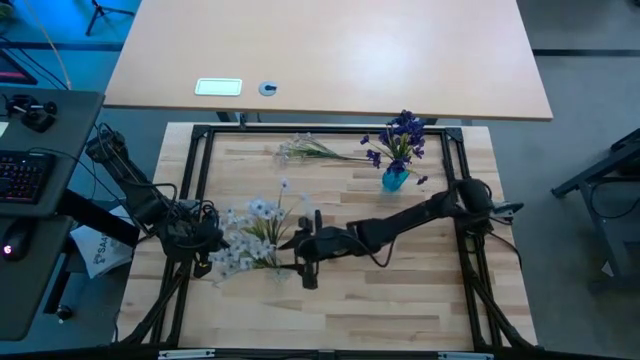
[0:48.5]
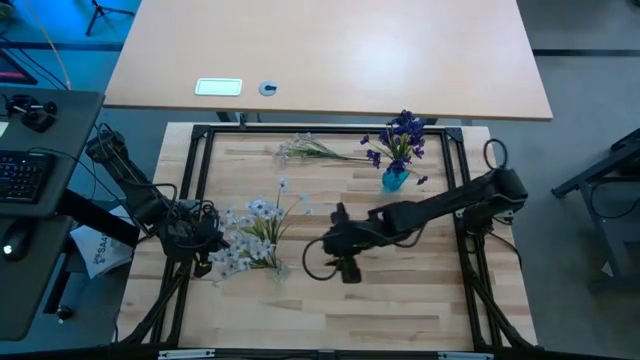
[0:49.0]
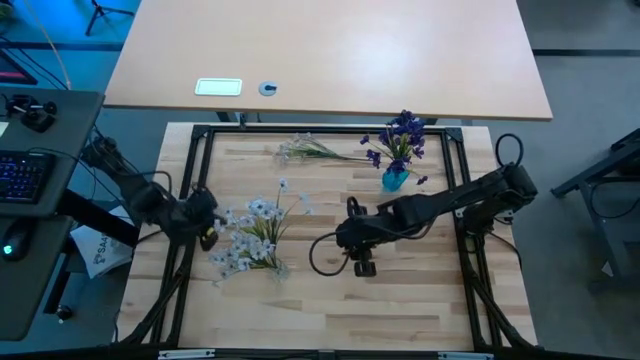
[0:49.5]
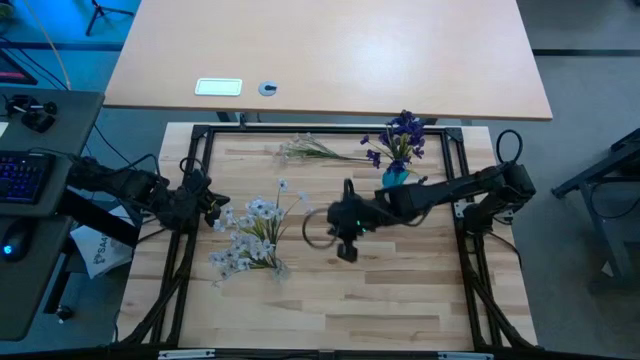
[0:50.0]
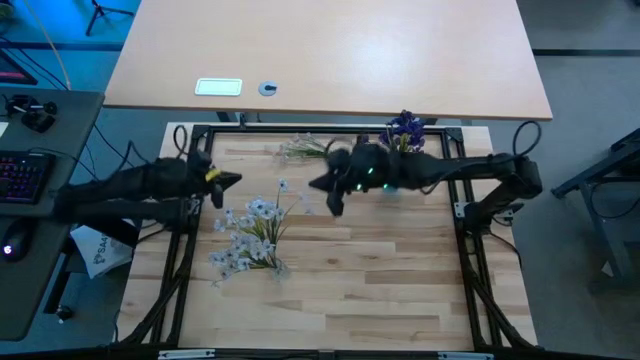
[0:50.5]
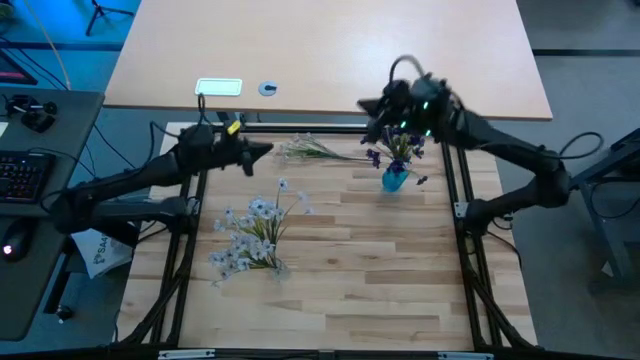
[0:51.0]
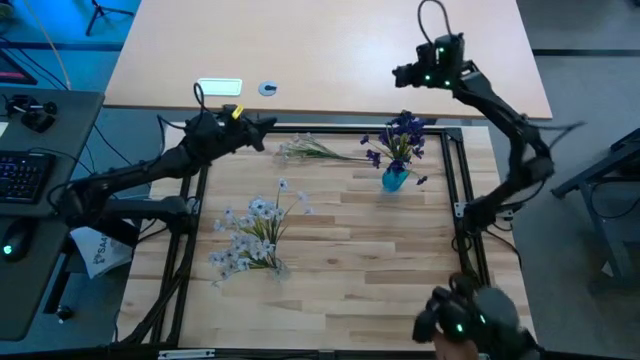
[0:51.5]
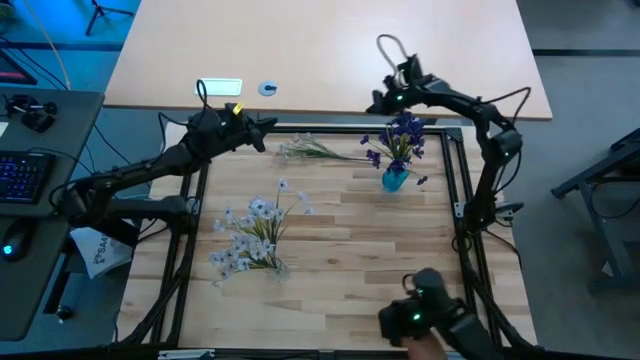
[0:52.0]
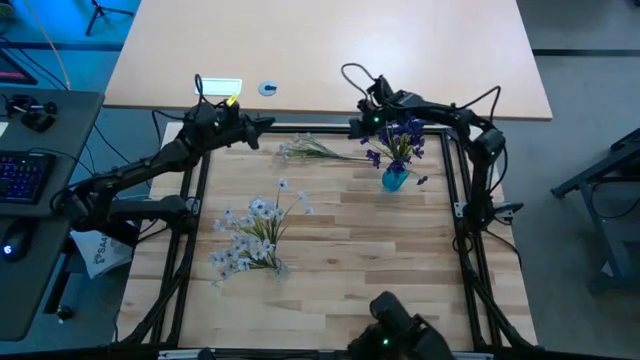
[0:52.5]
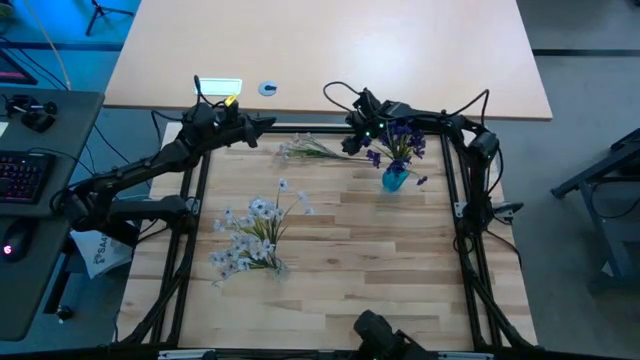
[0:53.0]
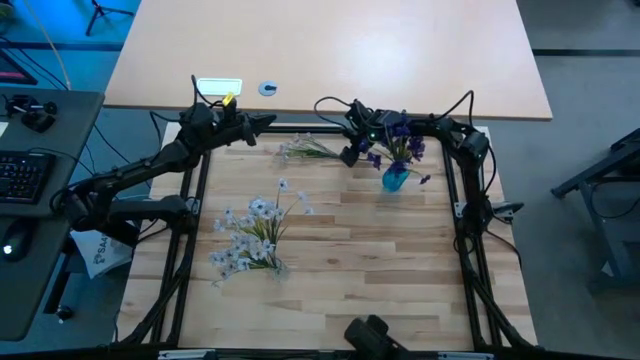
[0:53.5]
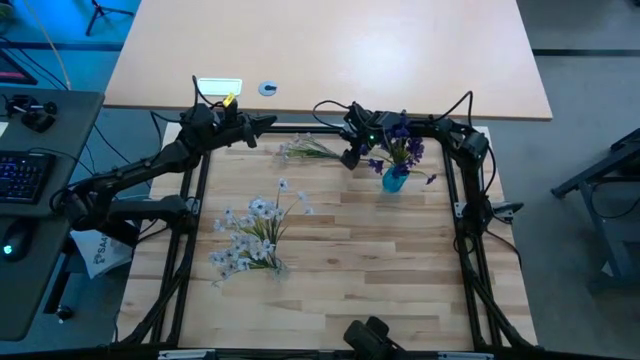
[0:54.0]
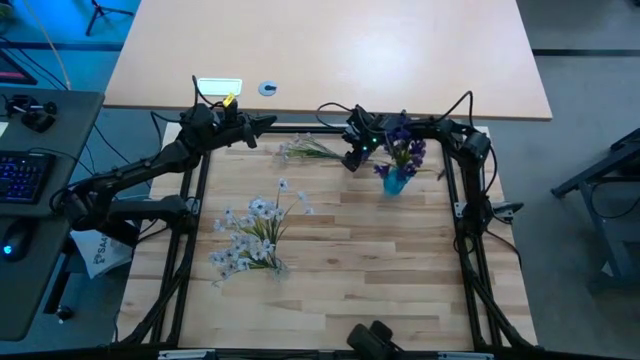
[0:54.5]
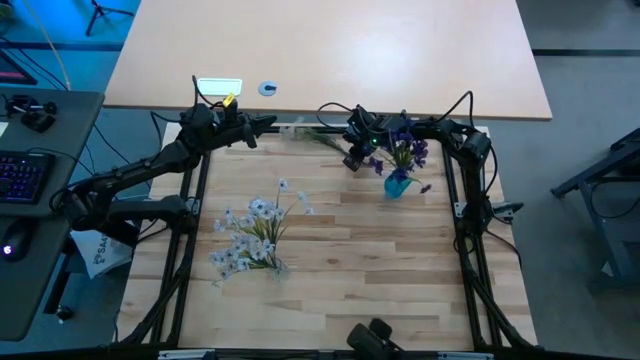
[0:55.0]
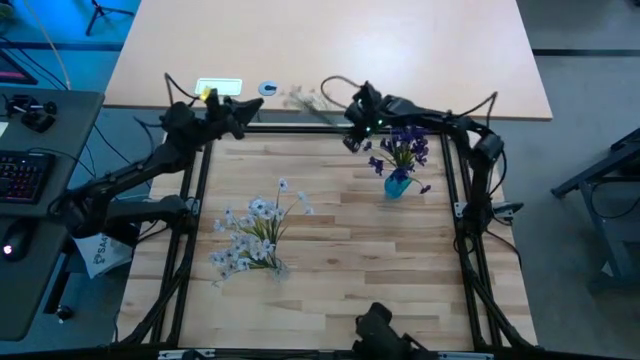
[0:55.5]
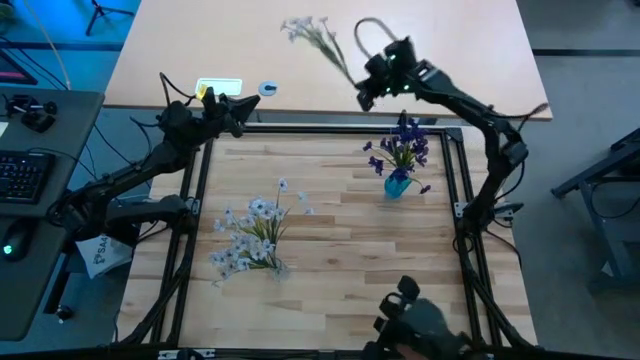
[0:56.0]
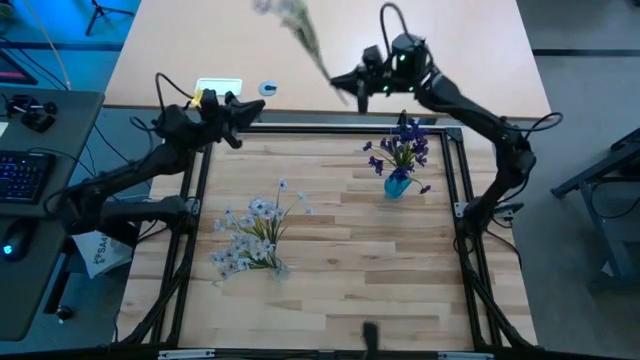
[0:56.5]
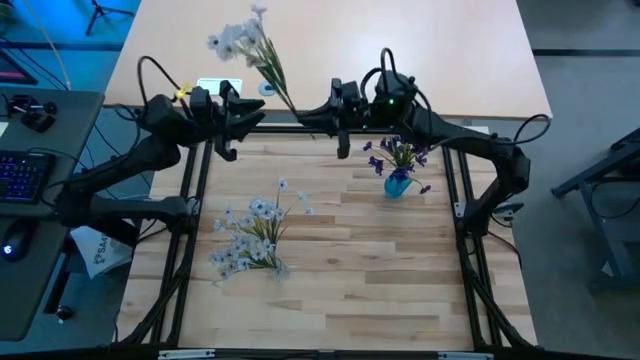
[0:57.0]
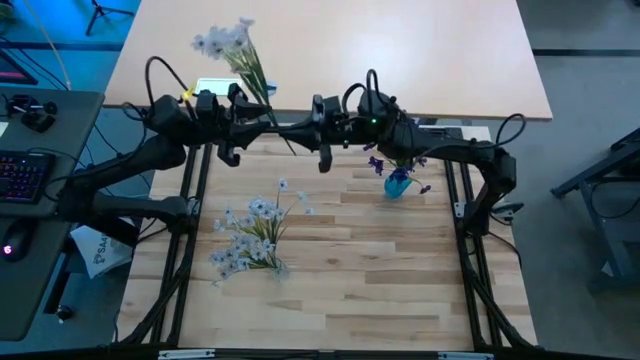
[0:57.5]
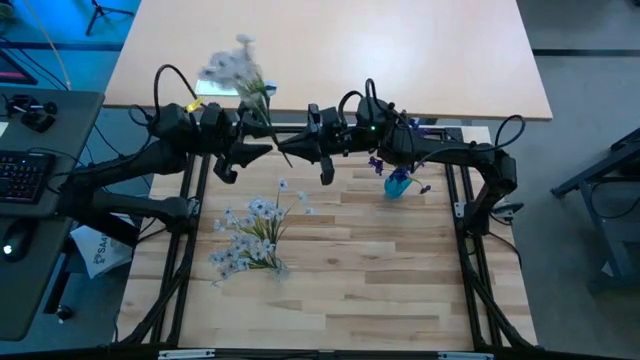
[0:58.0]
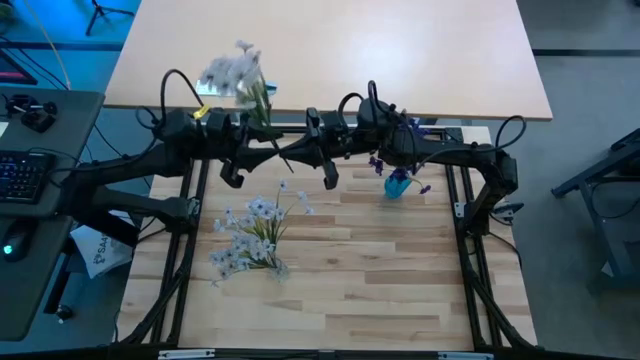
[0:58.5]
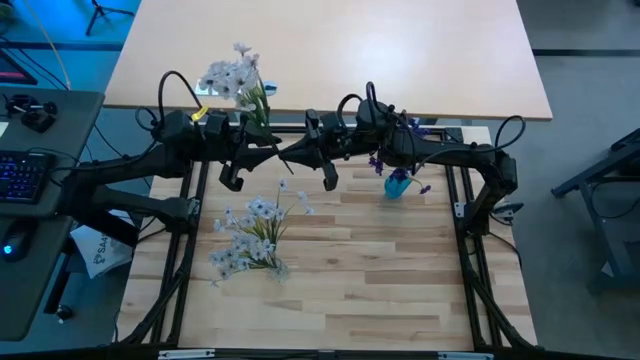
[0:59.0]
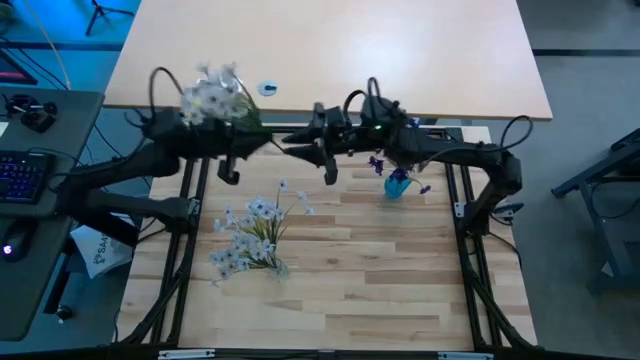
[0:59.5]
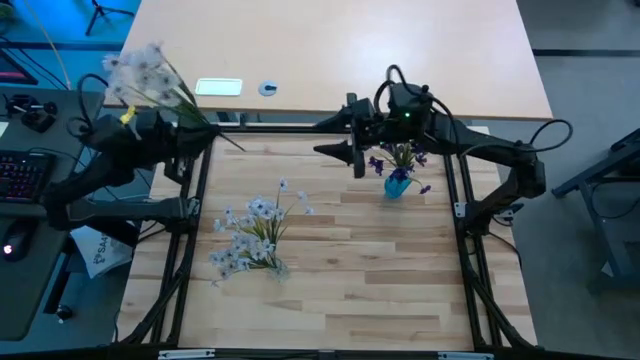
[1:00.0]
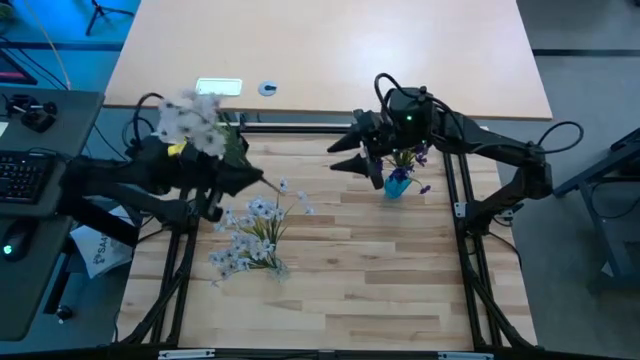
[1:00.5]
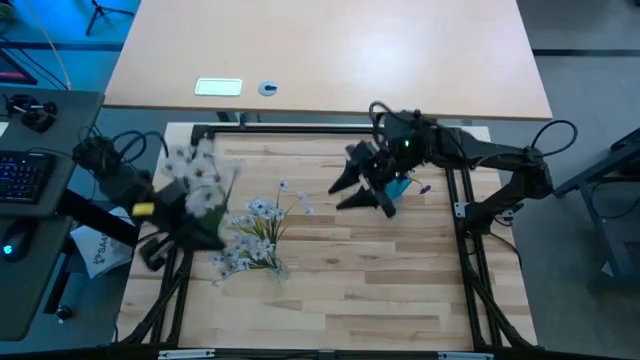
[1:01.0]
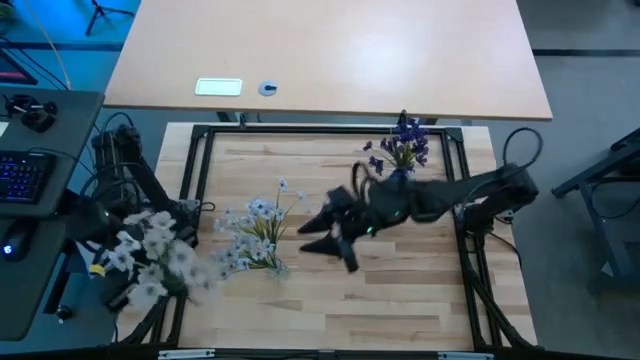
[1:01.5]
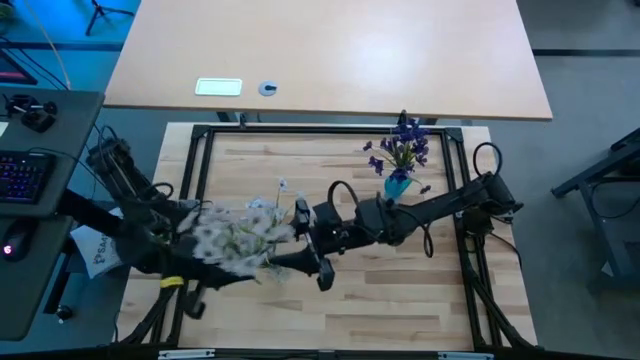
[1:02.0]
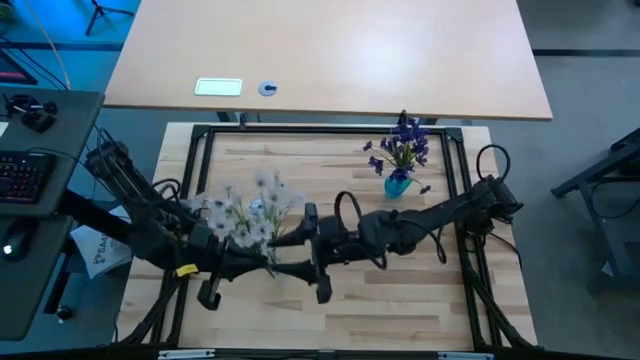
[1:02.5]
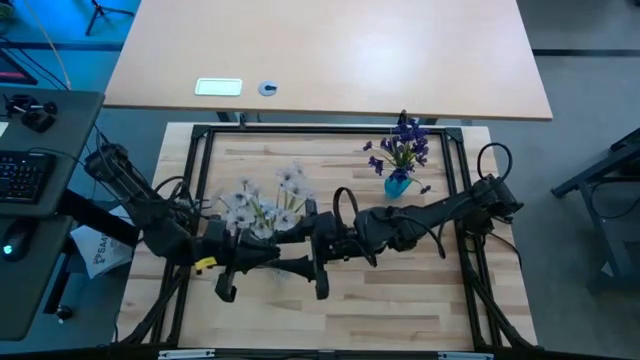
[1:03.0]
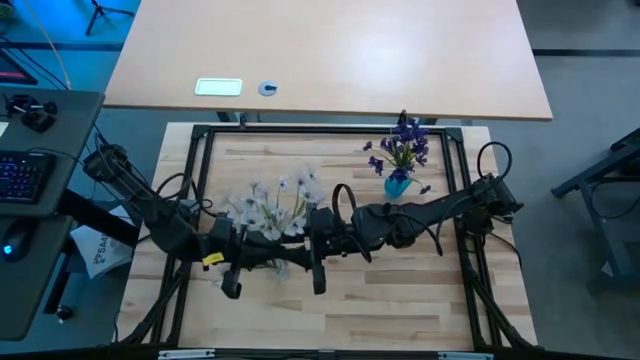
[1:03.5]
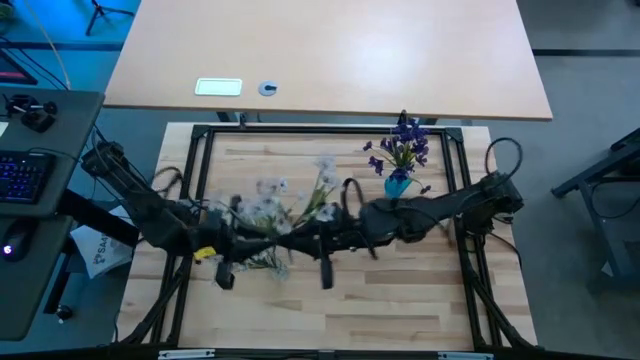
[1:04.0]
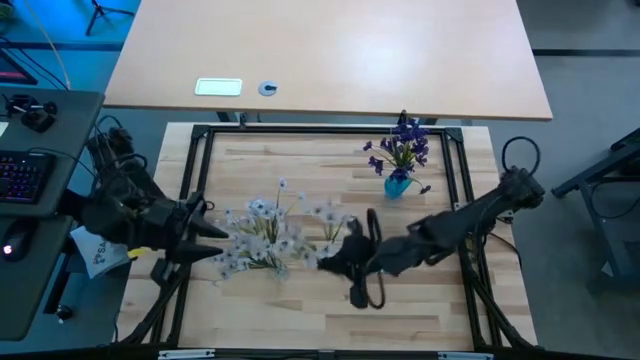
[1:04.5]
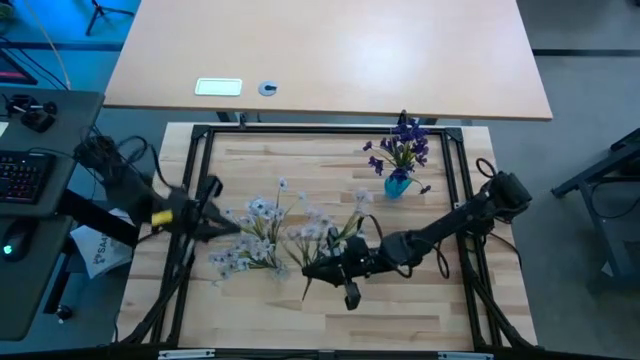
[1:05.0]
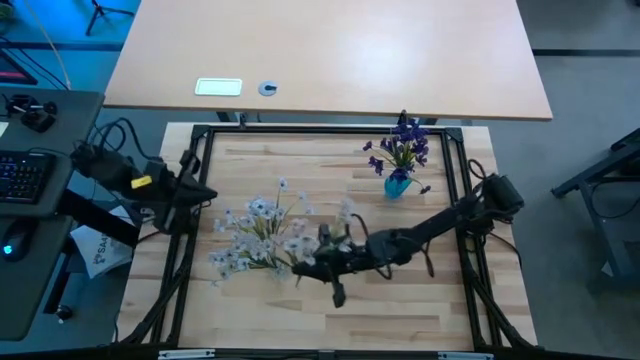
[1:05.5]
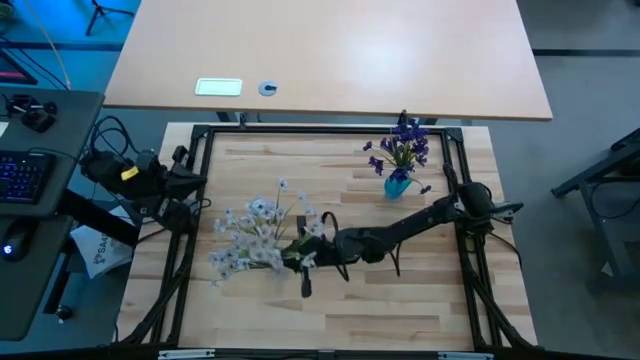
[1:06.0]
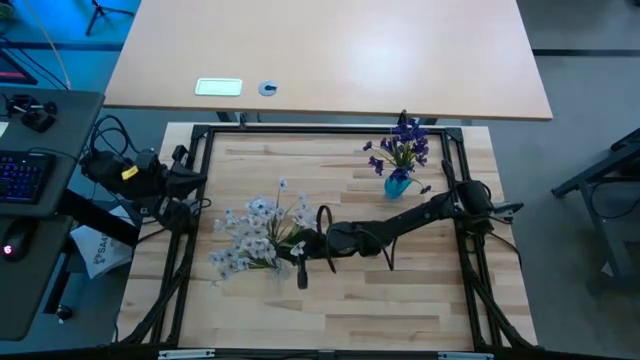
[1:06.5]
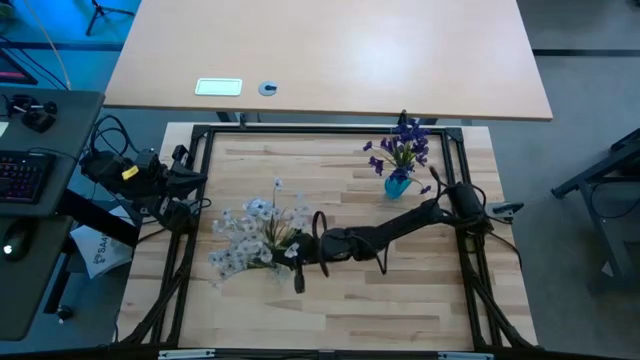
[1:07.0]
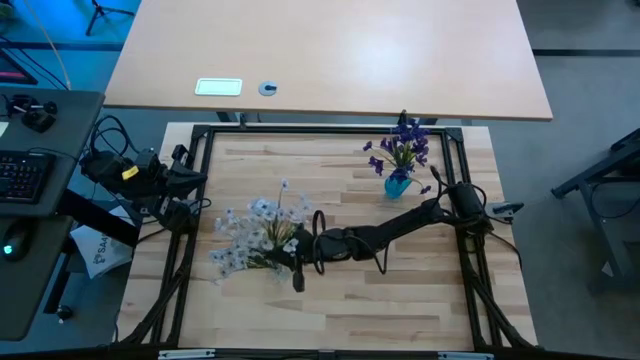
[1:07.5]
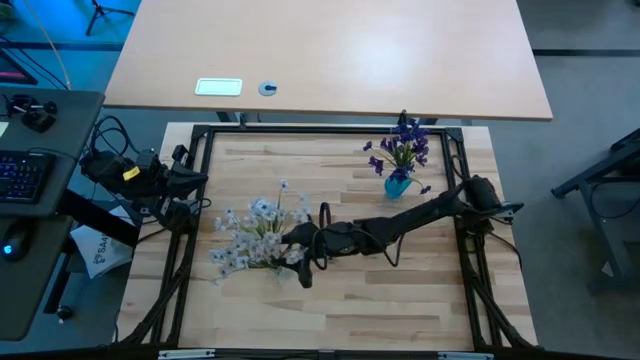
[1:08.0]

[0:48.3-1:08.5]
Task: Sort flowers into vase by color
Put the white flowers into the transparent vase

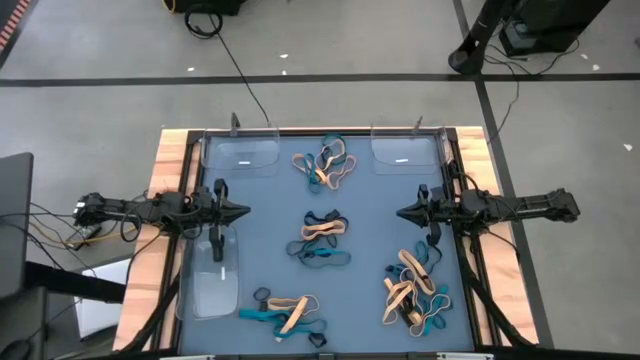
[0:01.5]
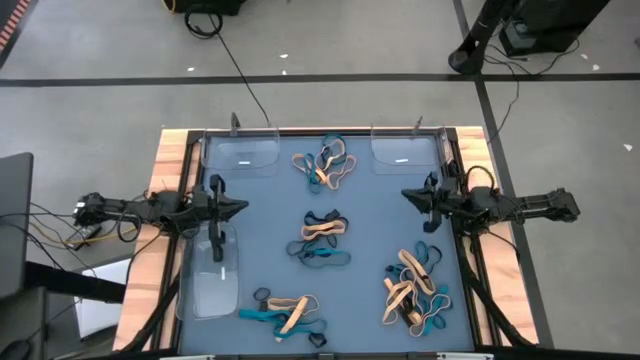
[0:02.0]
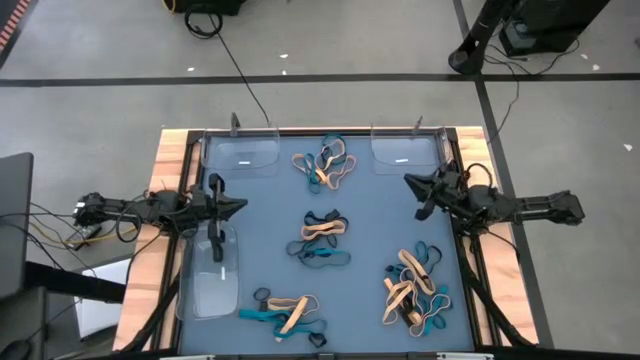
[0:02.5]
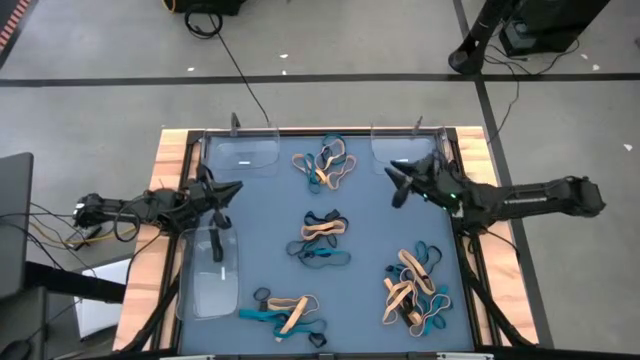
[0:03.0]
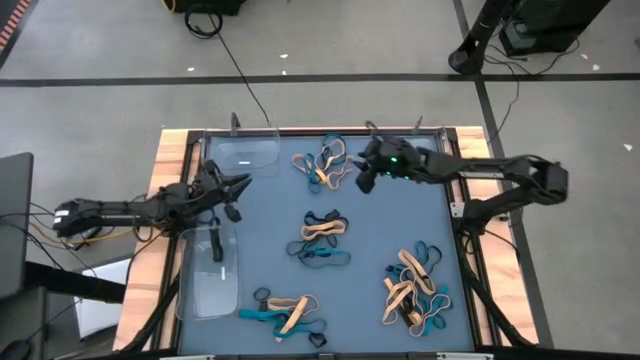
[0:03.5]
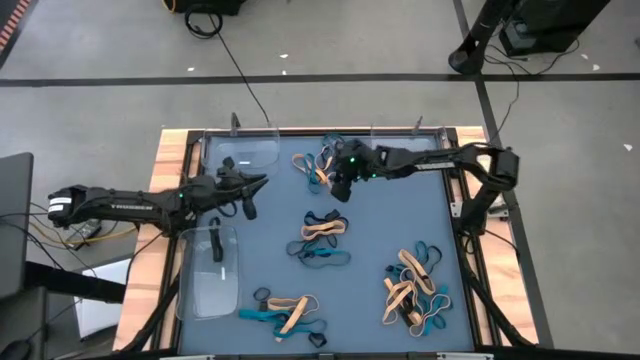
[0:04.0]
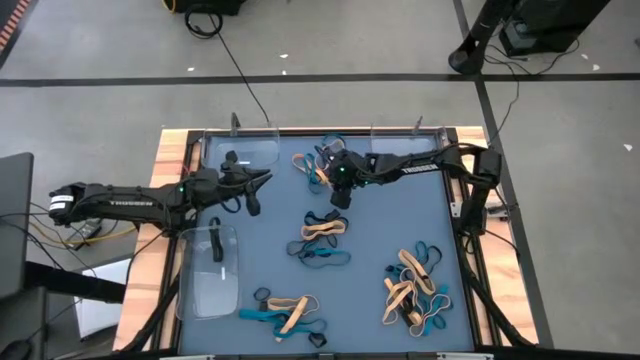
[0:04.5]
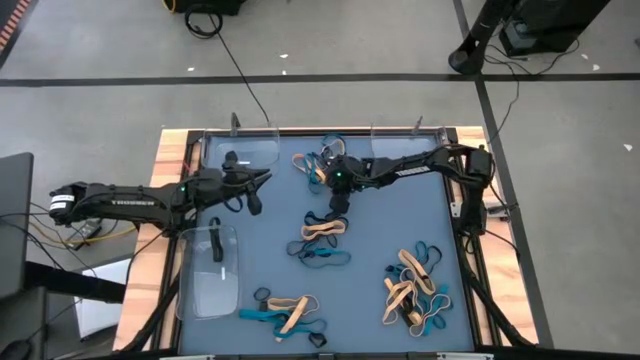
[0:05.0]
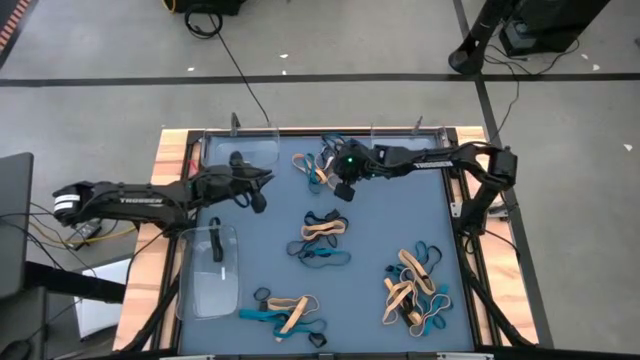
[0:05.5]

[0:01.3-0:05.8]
Task: Sort rubber bands into baskets
Put the yellow rubber band into the top right transparent bin
